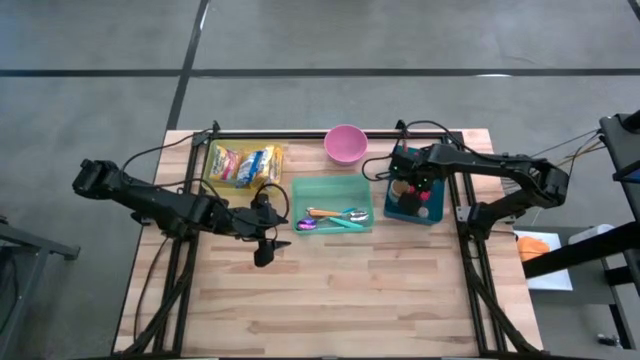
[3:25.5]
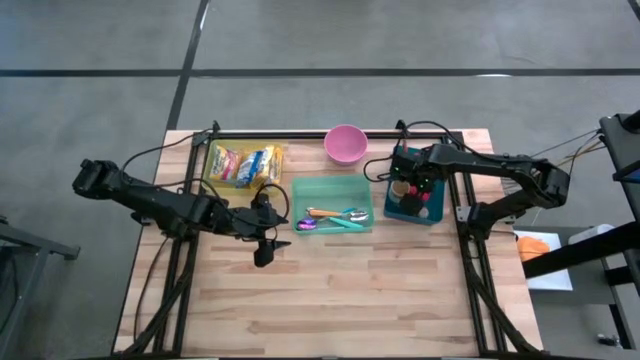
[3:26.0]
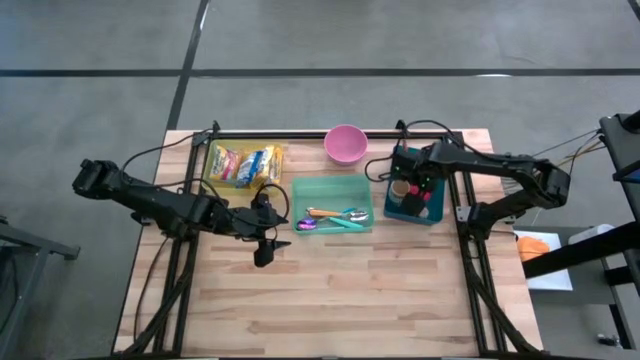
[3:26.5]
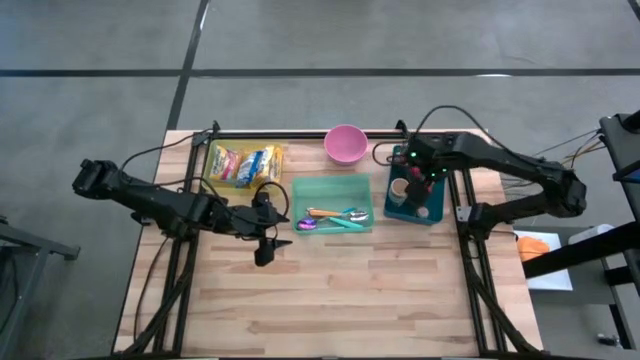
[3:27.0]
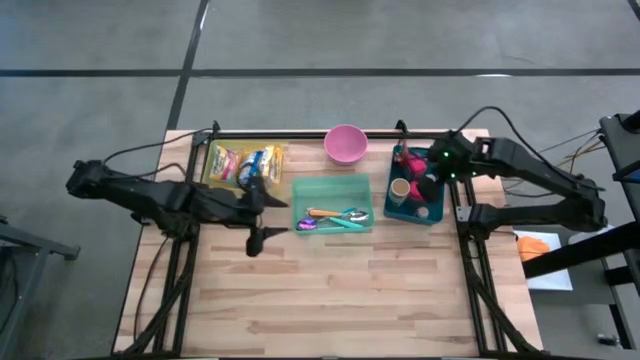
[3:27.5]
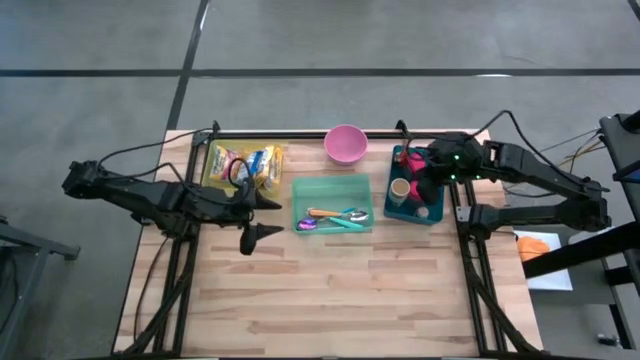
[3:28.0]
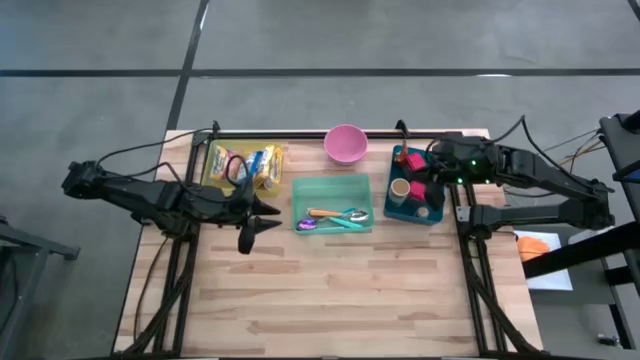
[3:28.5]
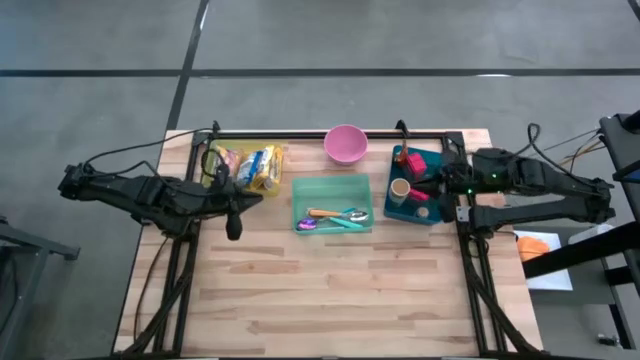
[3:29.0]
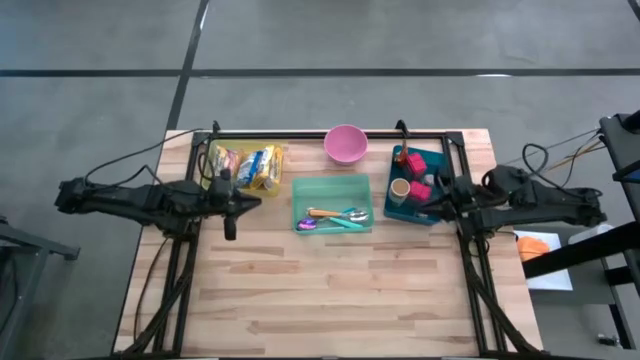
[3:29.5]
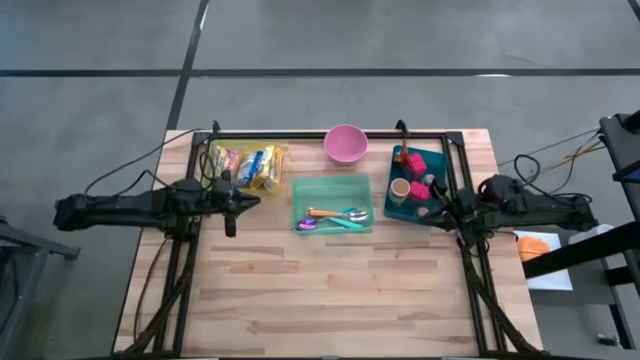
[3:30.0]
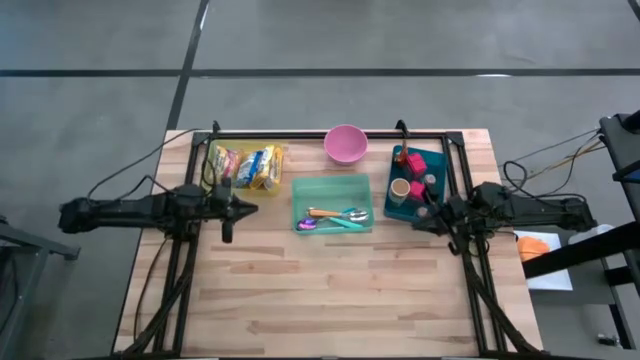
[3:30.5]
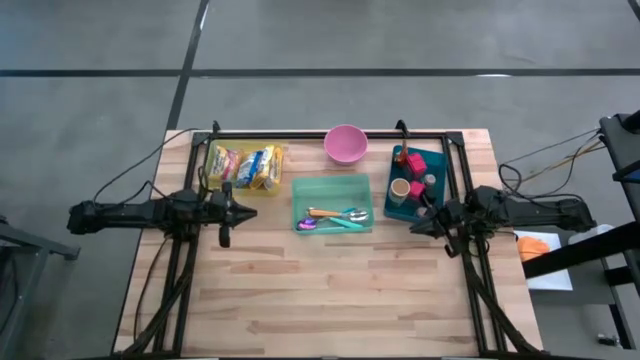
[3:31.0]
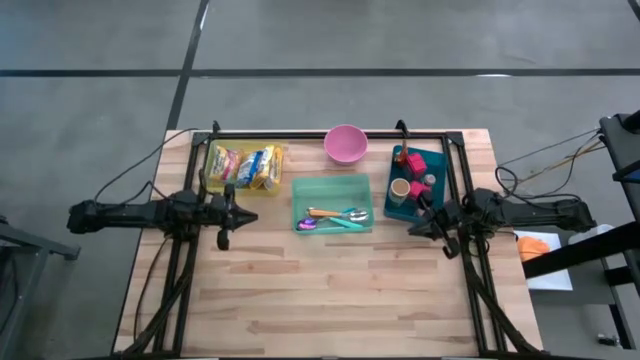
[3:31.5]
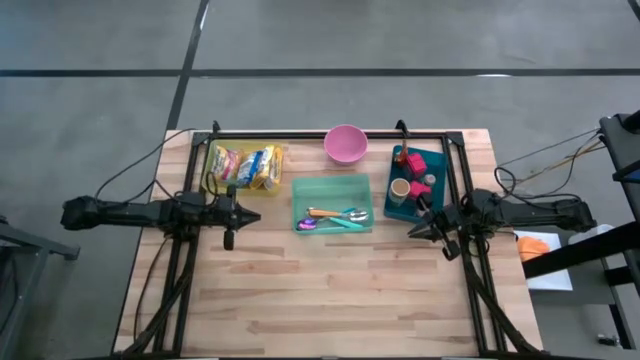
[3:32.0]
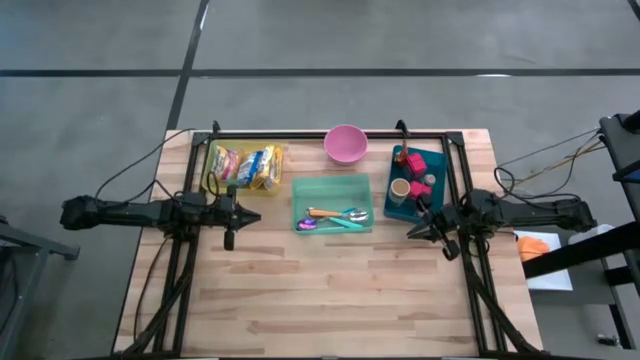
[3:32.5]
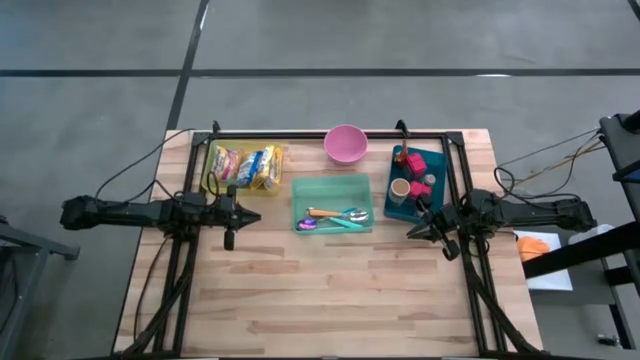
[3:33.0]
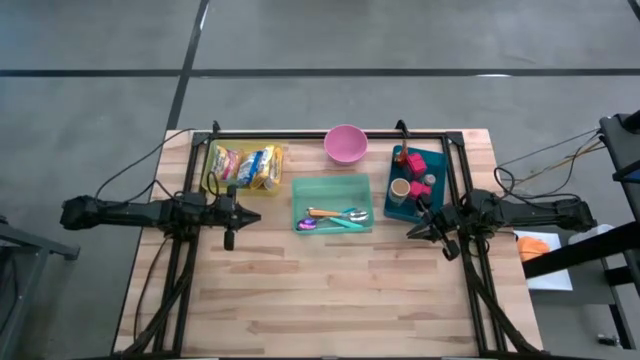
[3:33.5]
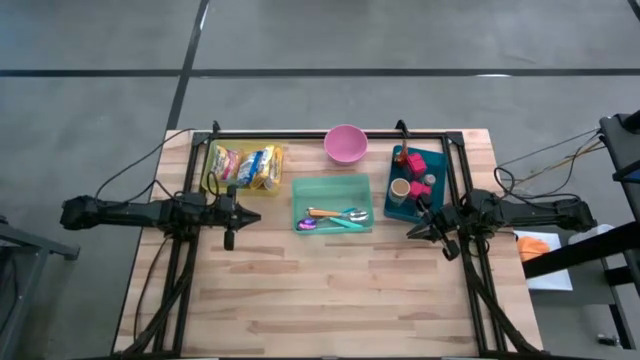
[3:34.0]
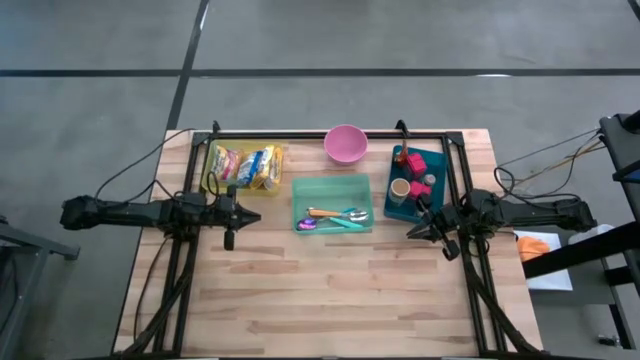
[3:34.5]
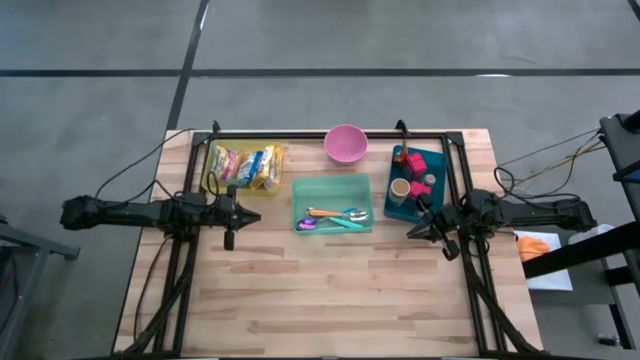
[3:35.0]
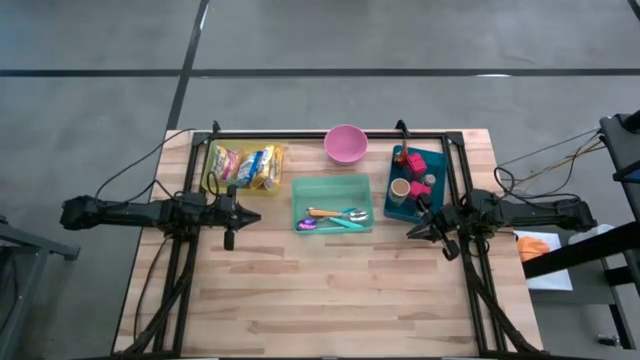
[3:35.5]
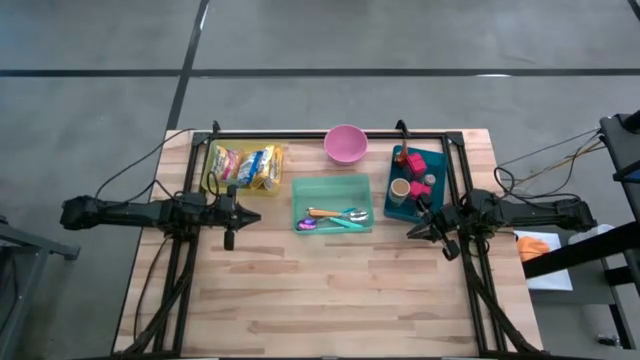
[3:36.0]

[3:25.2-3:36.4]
Return to Home Position

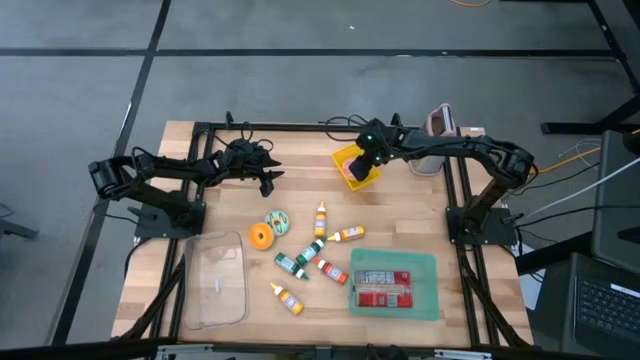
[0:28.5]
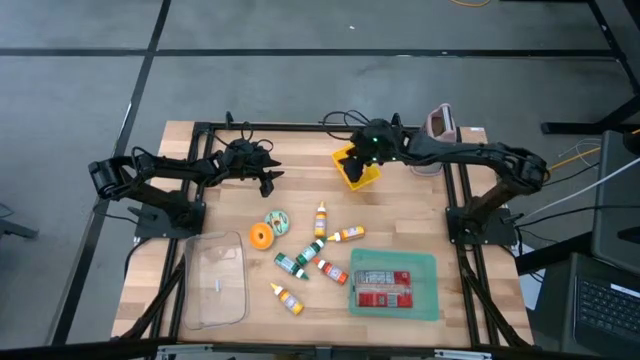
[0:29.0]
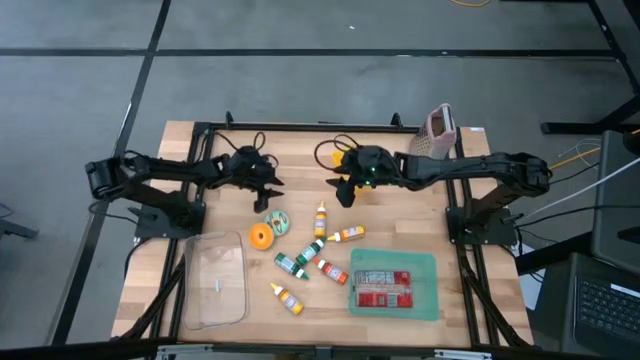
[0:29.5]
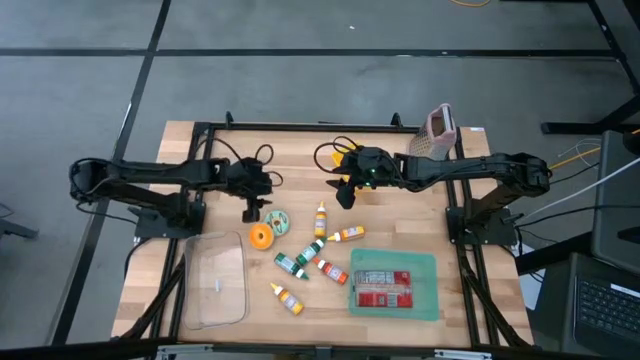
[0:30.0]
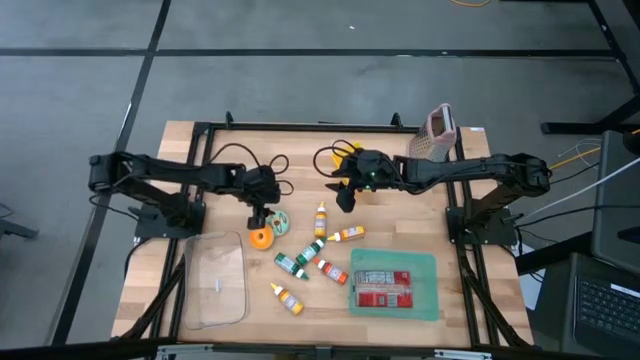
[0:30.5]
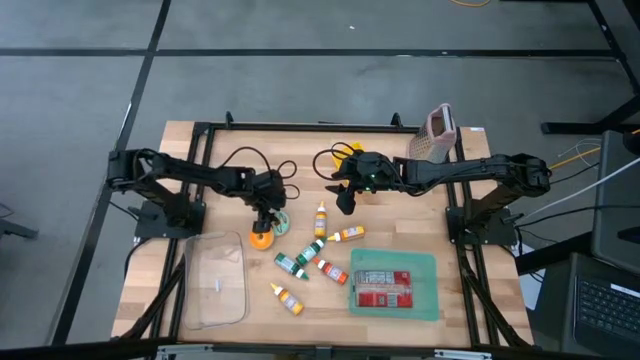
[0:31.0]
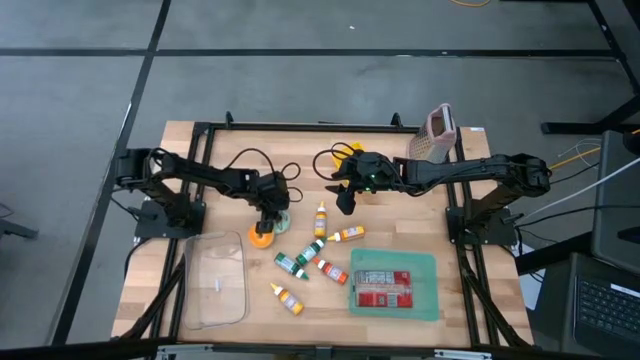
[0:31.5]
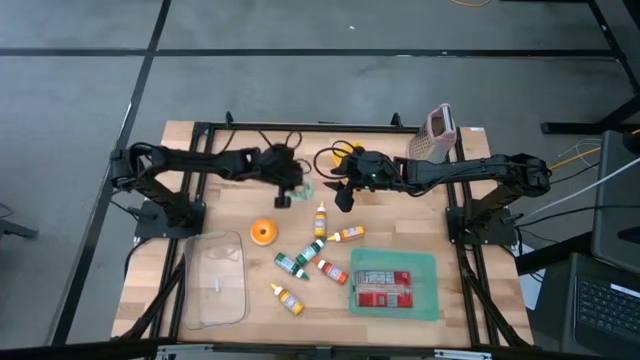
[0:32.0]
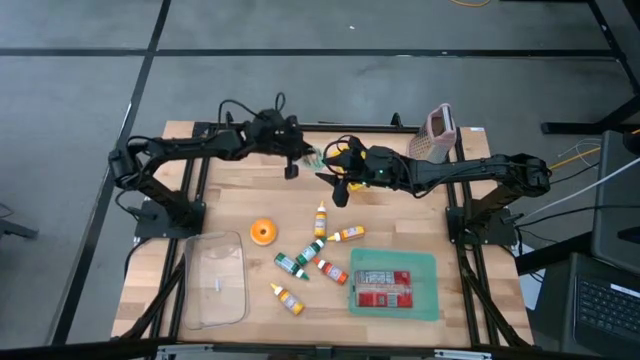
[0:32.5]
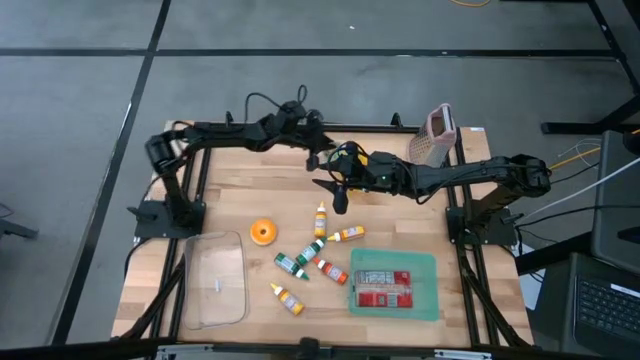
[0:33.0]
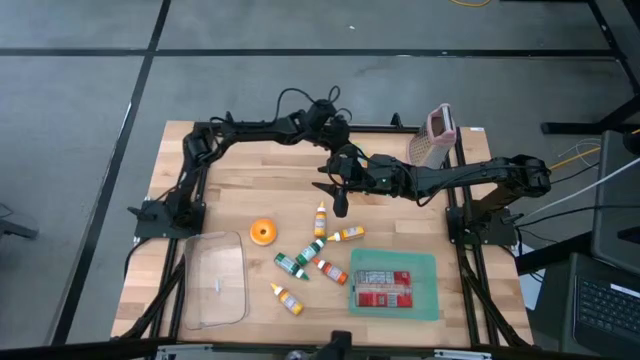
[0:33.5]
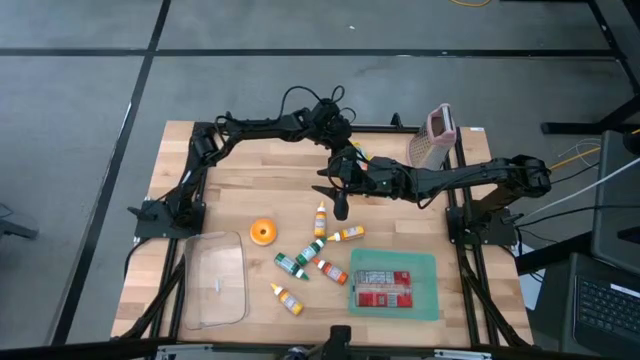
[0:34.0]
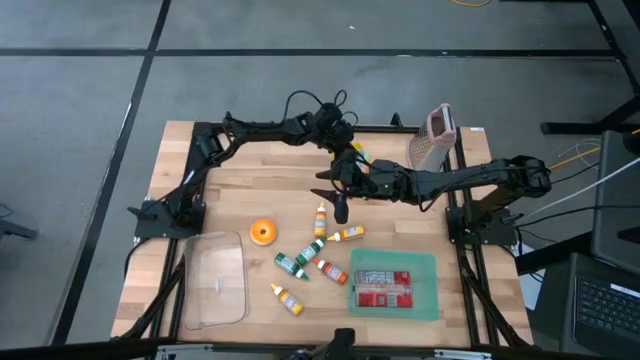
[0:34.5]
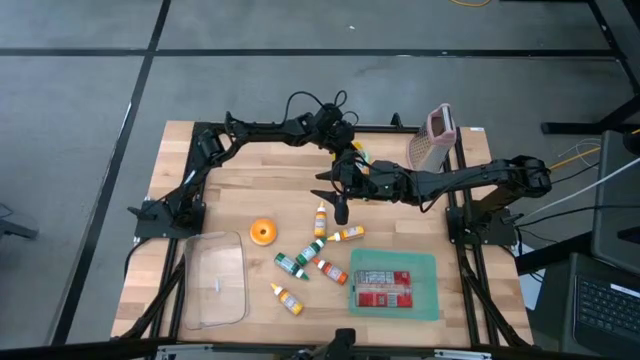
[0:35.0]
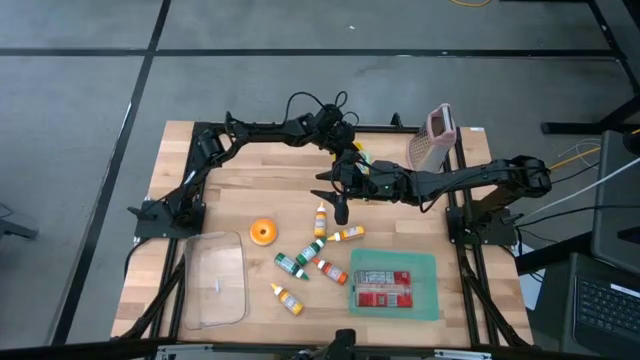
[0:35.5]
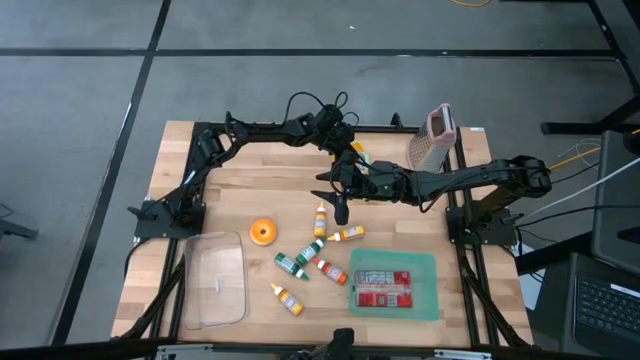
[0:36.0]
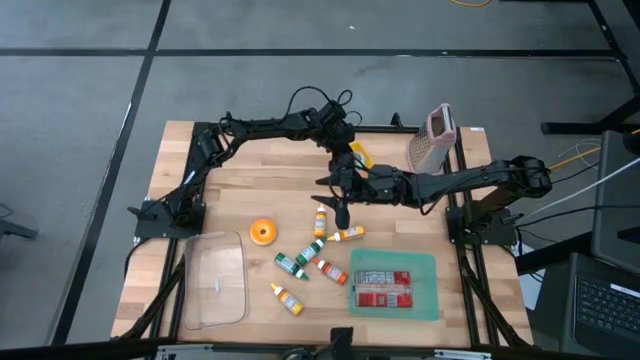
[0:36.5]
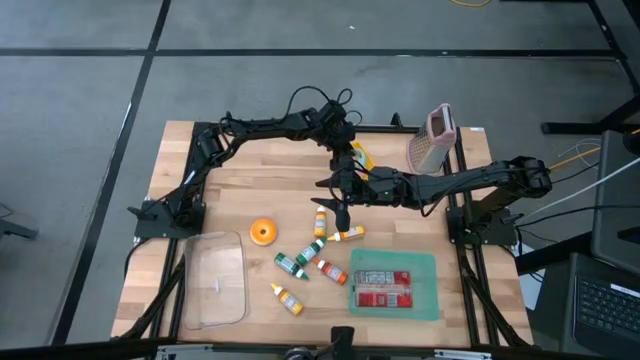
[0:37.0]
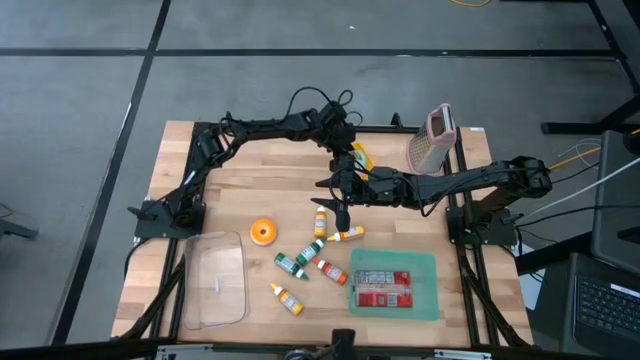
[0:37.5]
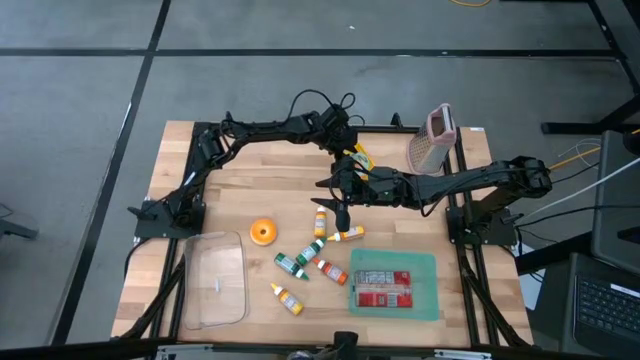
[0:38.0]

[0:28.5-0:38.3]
Stack the top green donut on top of the pink donut in the yellow bin
